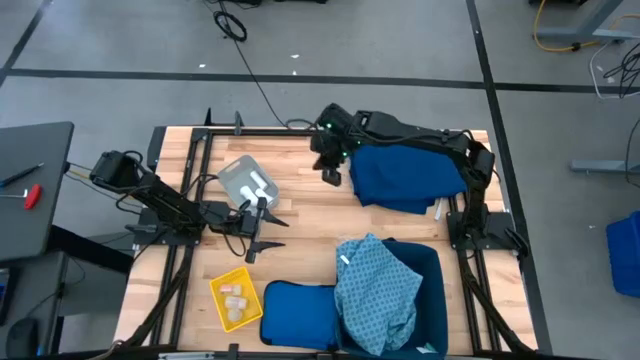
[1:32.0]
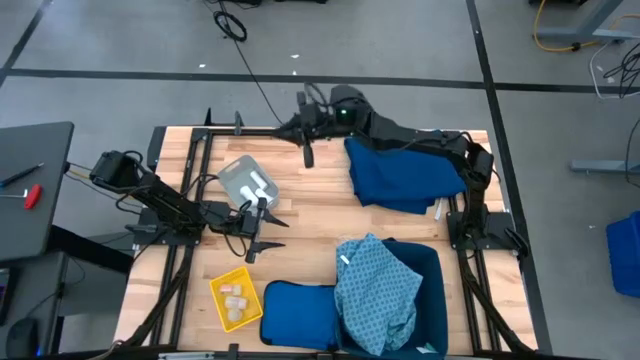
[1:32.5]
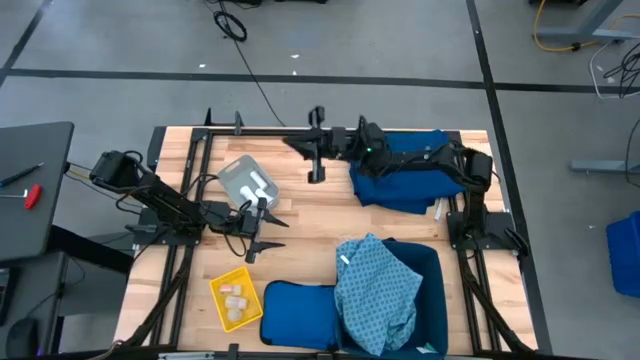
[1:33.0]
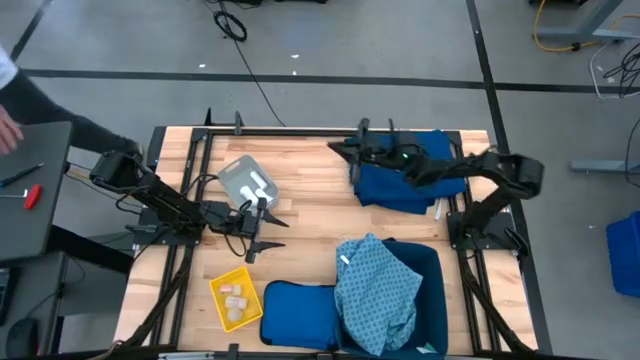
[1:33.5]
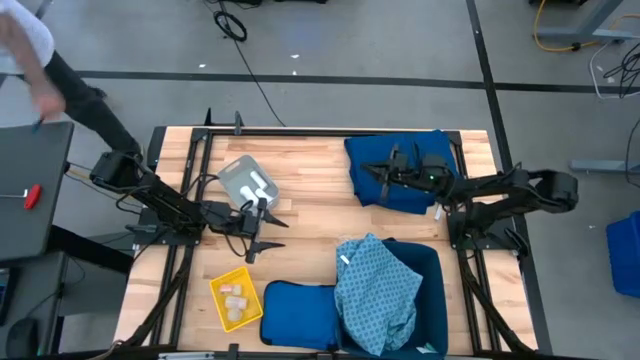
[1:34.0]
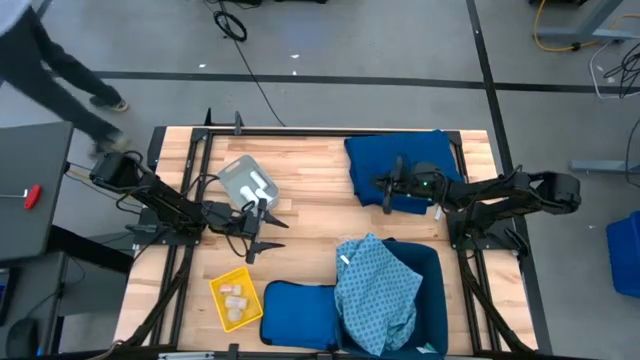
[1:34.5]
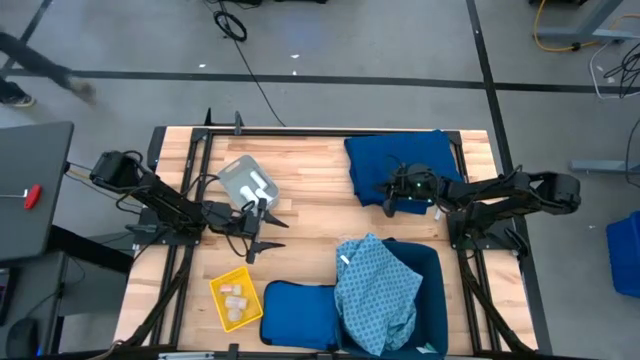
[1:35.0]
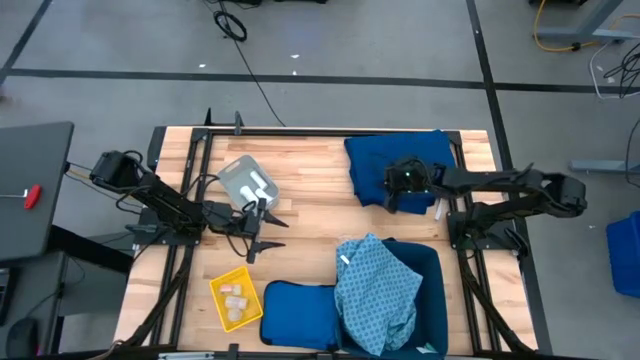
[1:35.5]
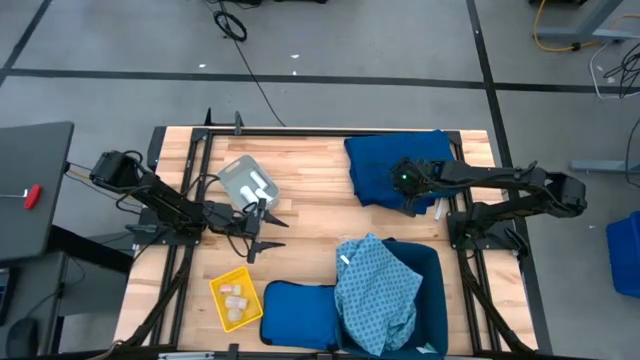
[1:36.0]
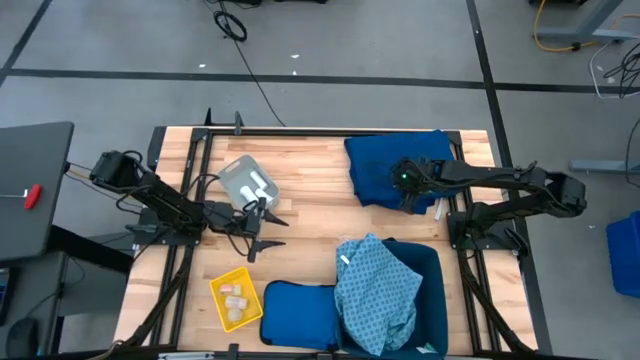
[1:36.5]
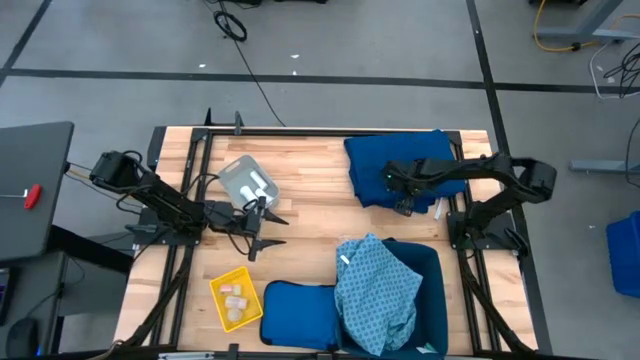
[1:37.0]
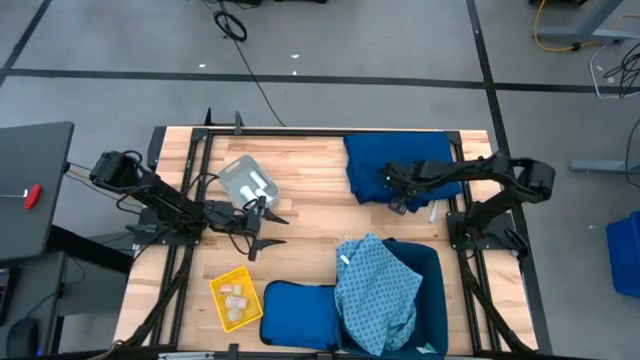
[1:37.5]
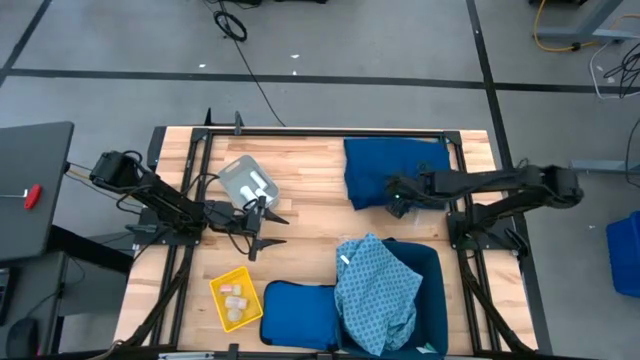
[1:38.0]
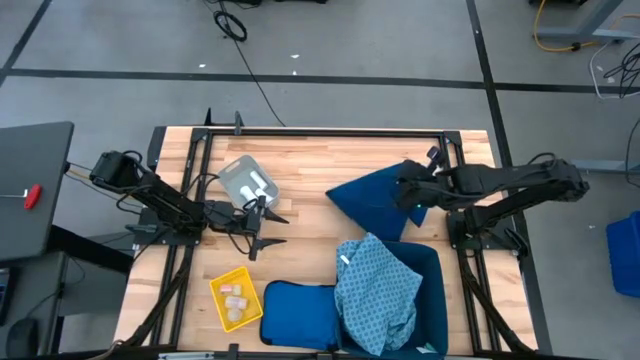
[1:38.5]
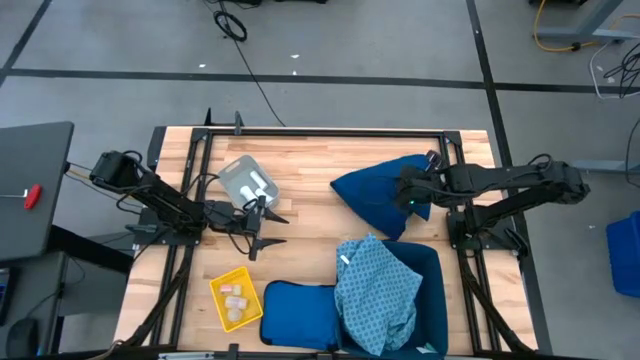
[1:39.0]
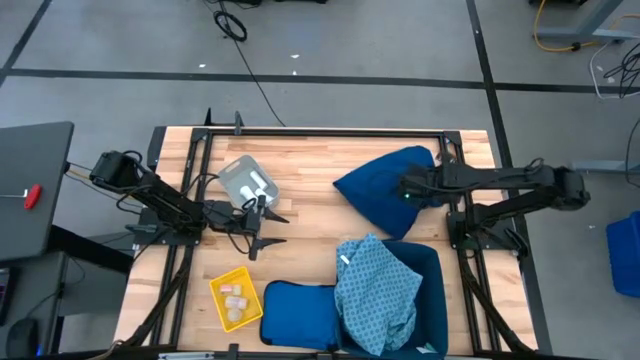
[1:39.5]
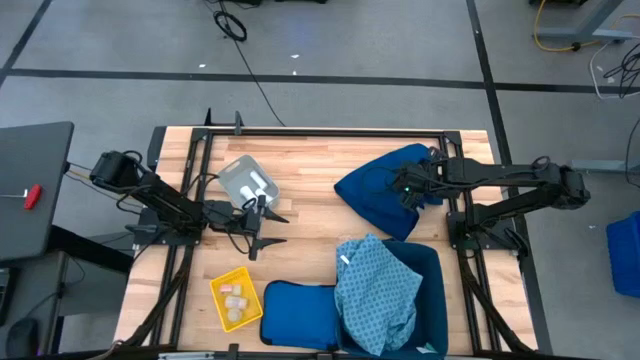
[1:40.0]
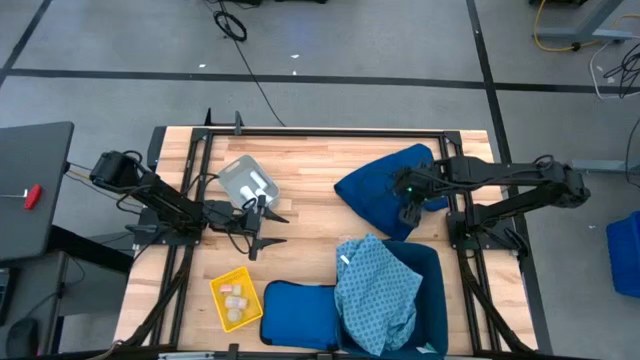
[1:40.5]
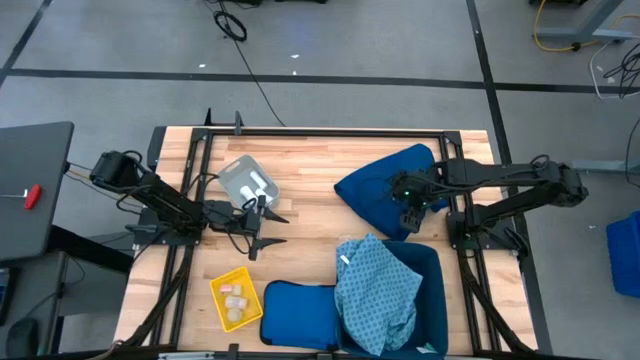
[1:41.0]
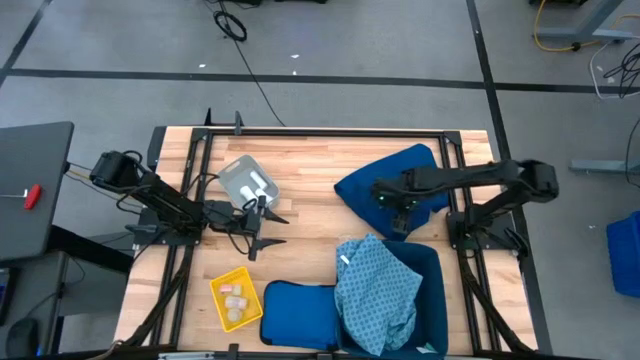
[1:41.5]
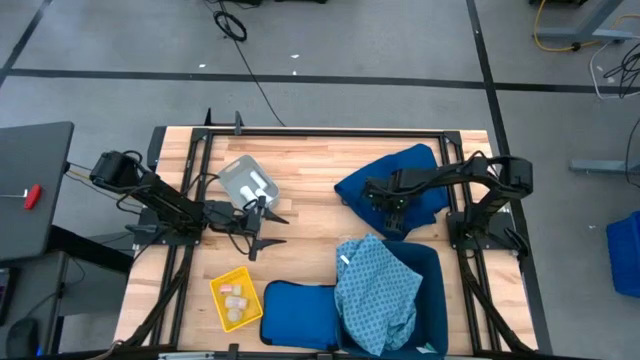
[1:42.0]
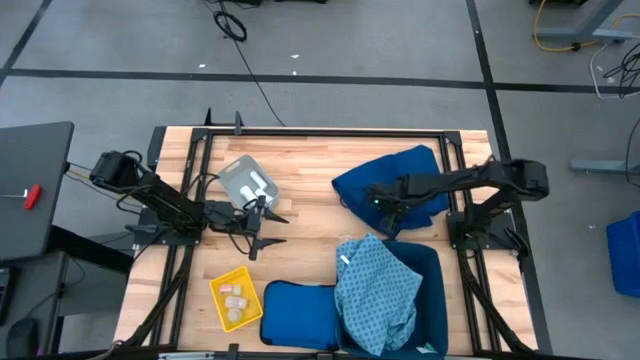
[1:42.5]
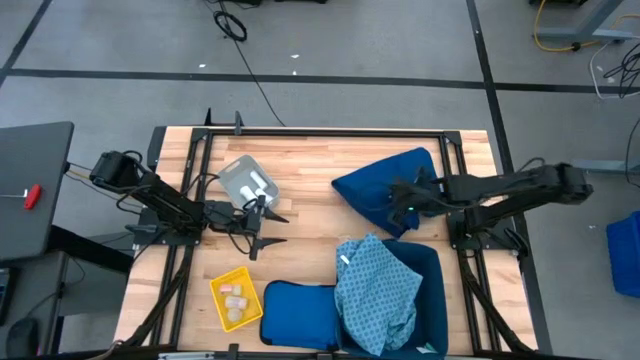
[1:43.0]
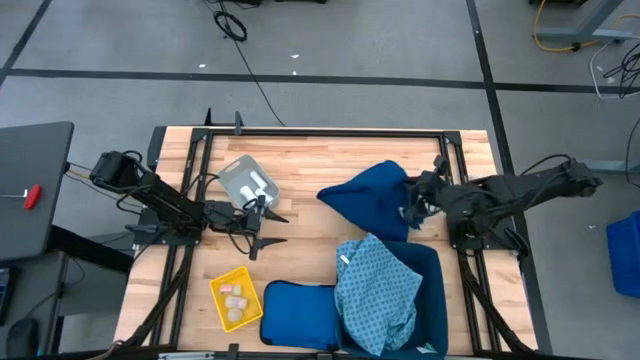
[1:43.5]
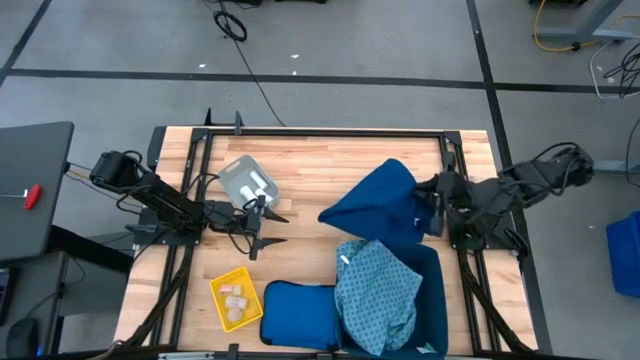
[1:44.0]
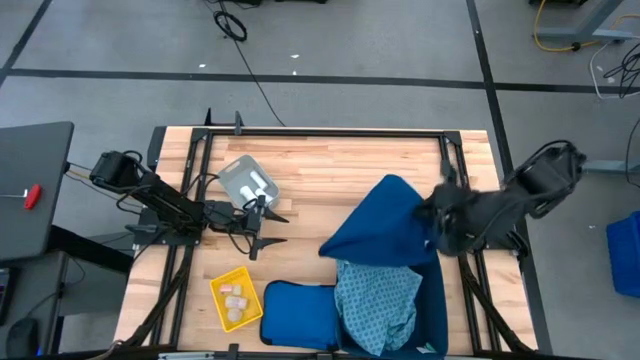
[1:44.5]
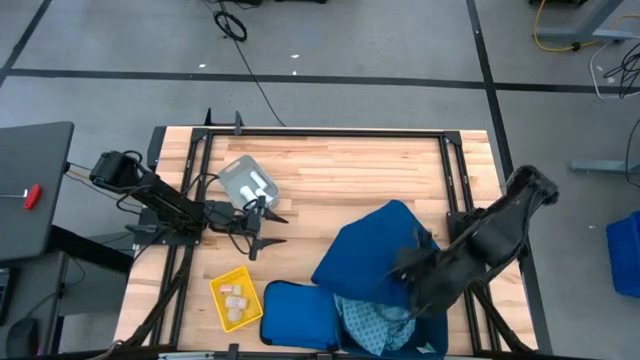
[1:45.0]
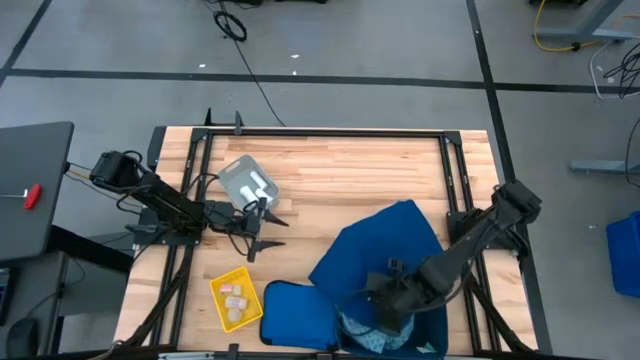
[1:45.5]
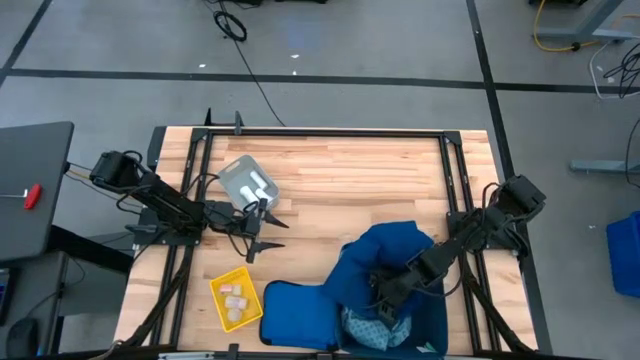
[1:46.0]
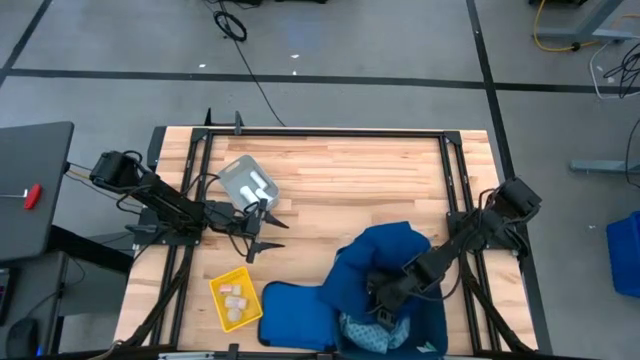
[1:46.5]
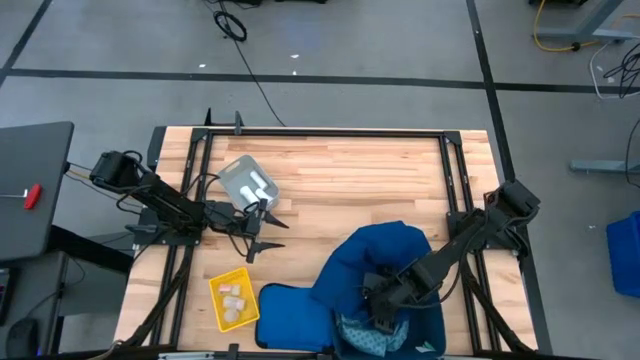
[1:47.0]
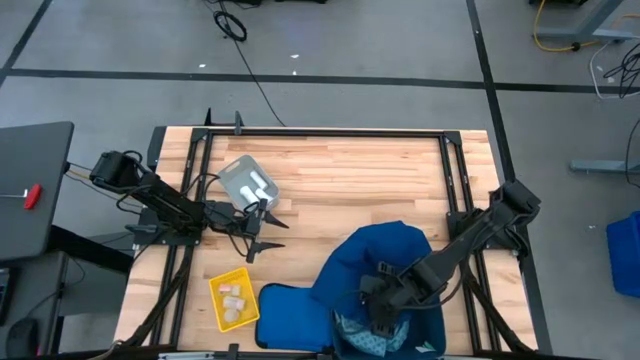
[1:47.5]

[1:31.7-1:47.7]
Task: Pick & place medical supplies in basket/bin
Put the blue patient gown into the blue laundry bin
